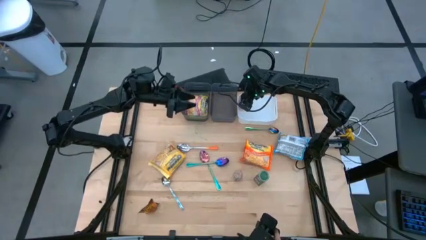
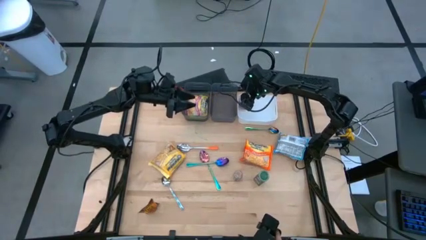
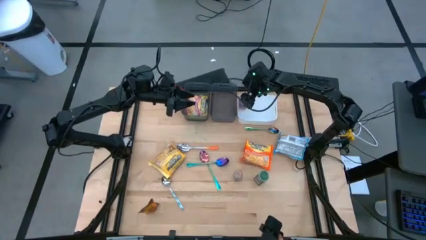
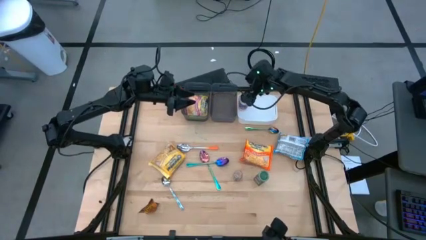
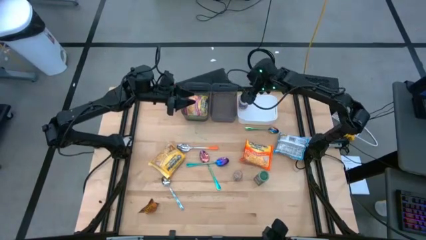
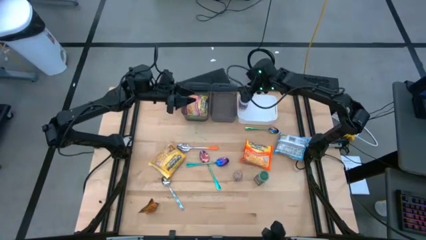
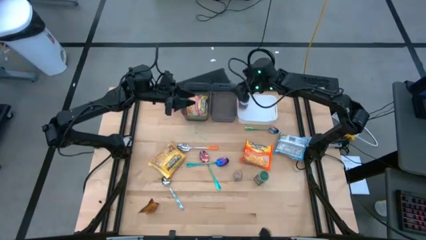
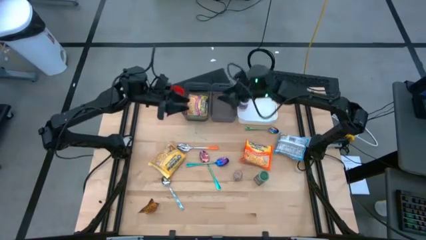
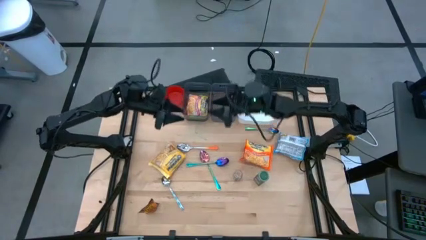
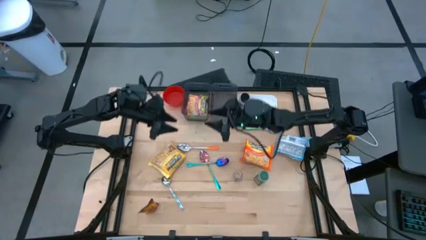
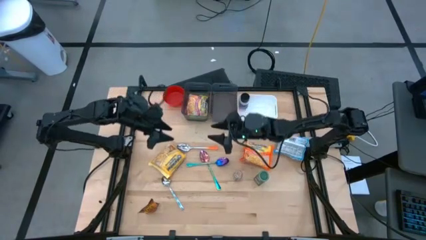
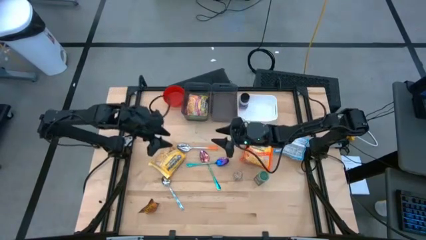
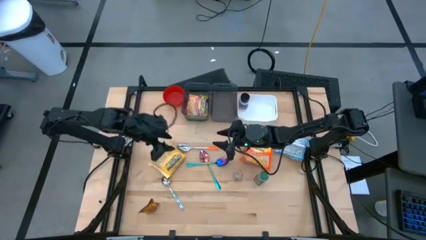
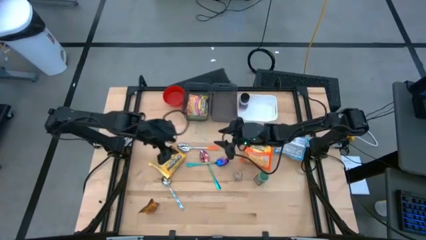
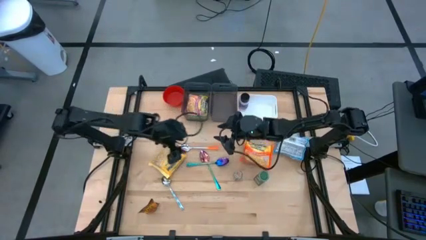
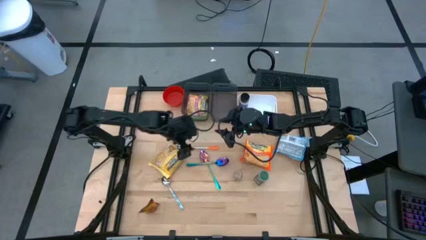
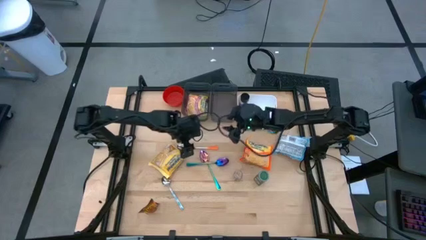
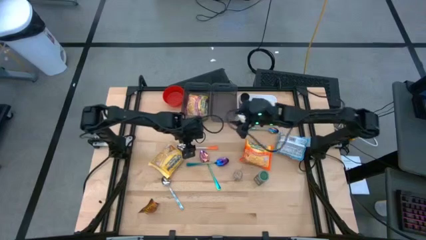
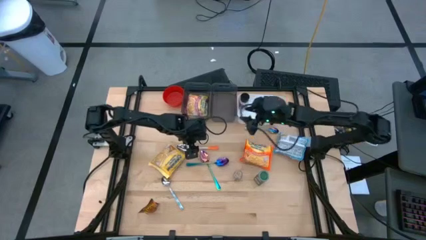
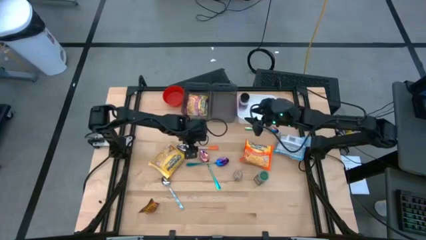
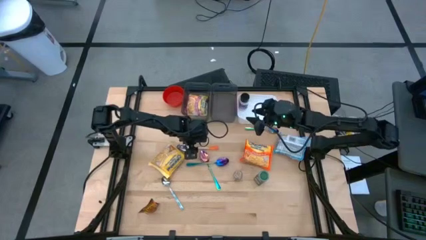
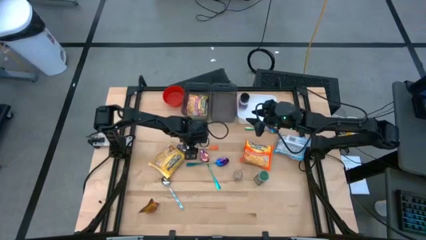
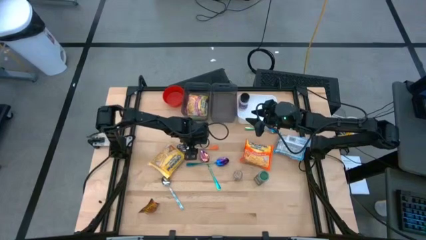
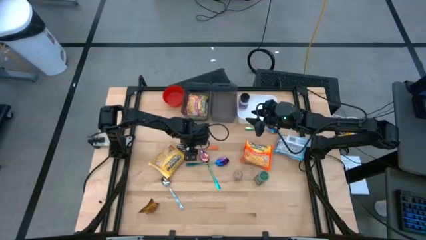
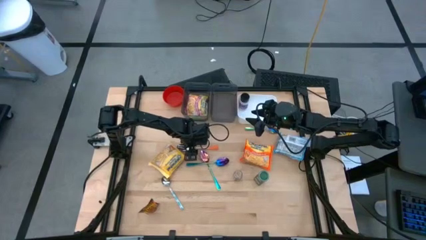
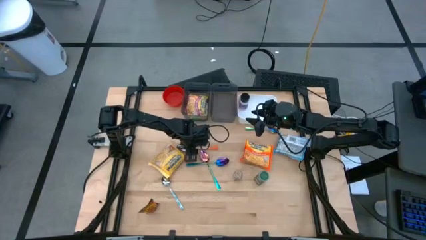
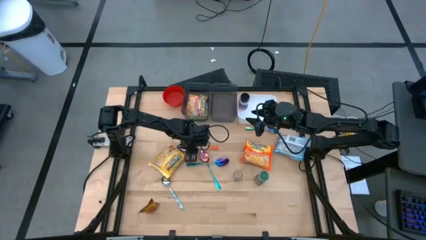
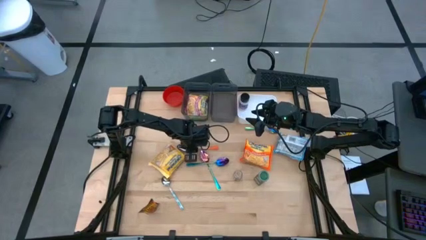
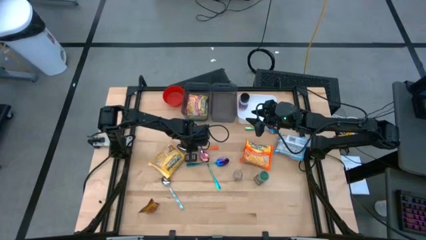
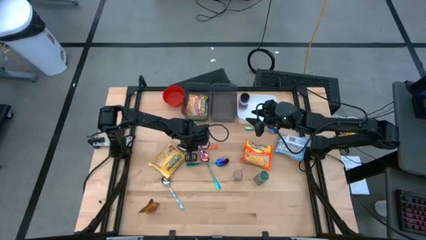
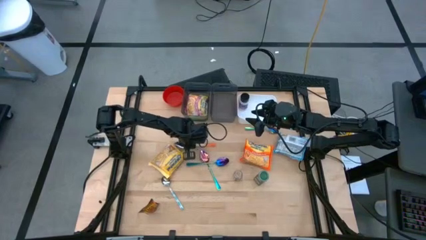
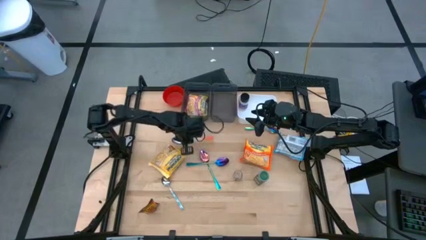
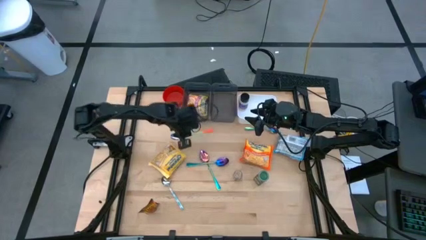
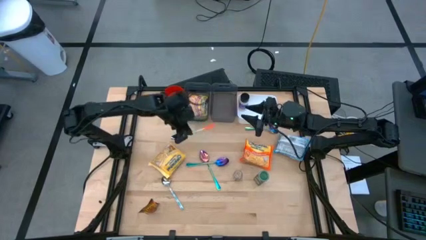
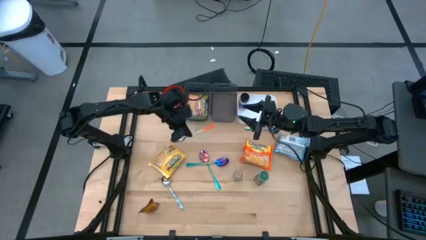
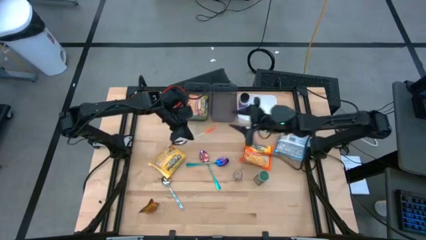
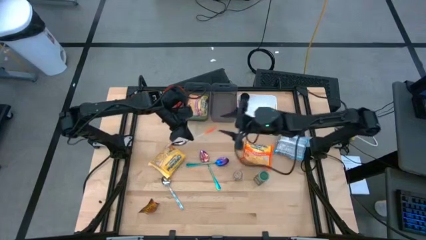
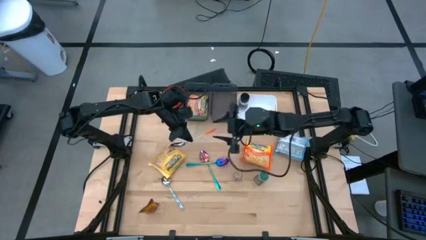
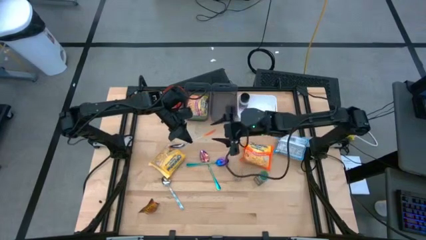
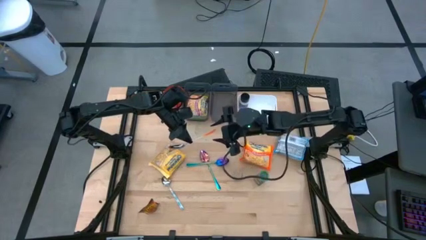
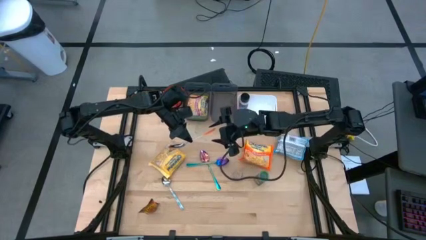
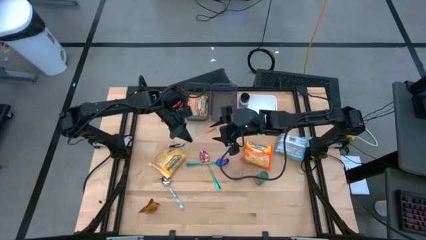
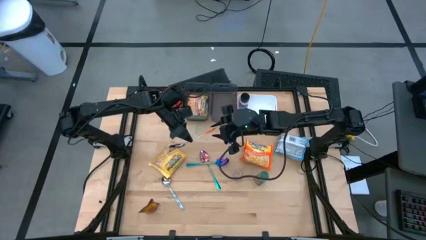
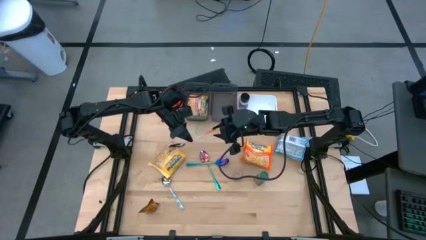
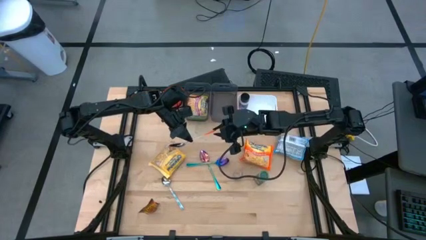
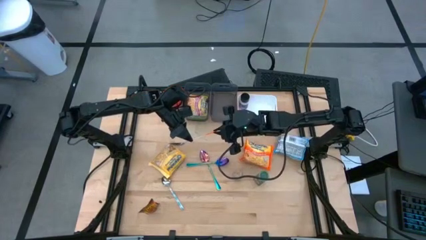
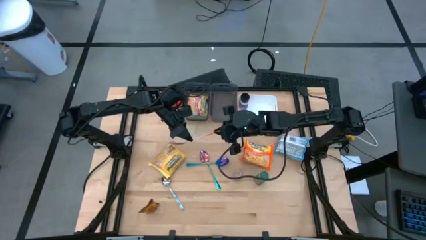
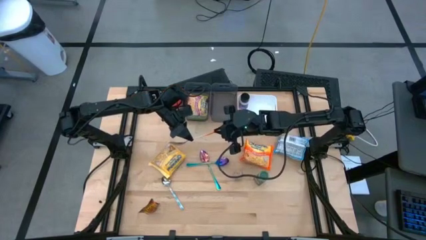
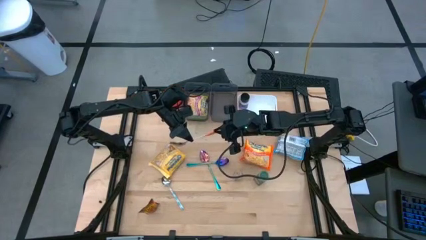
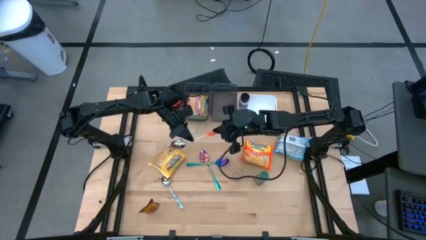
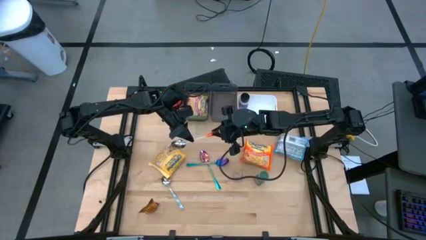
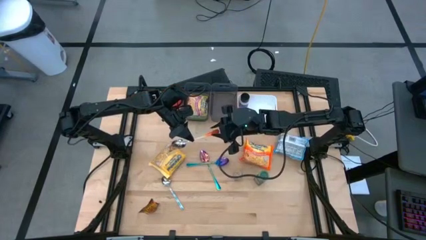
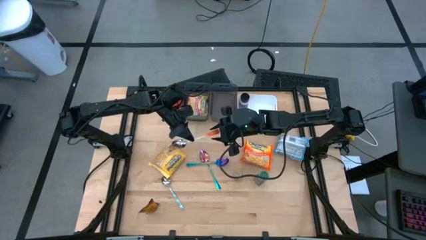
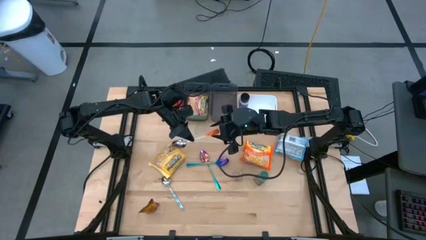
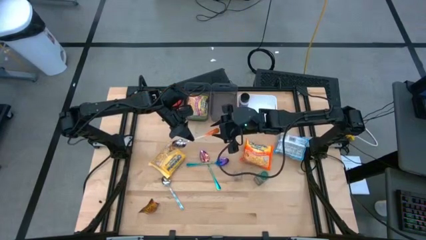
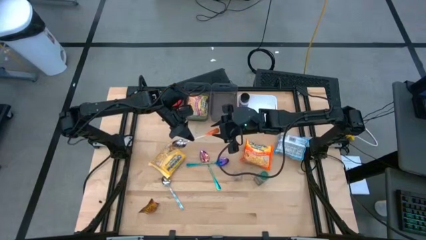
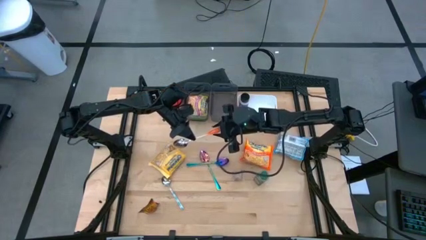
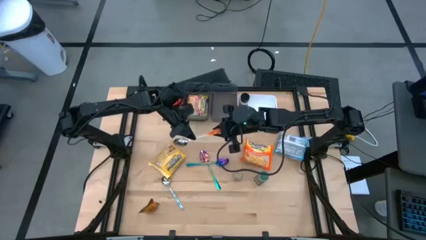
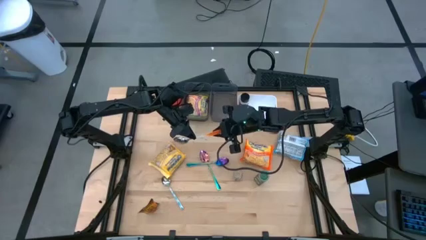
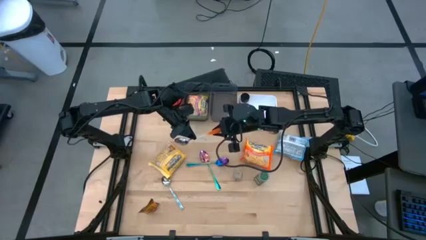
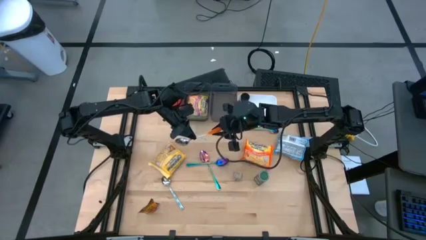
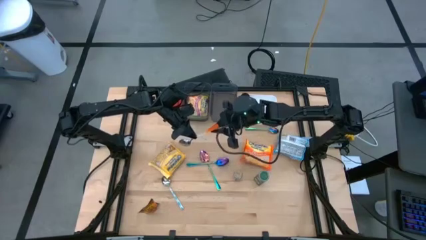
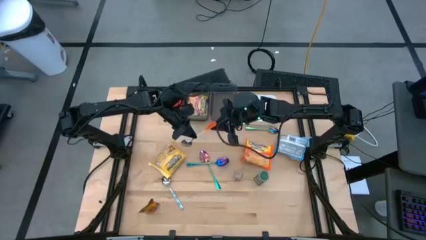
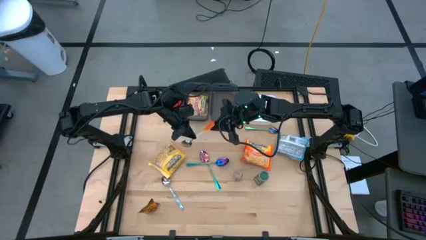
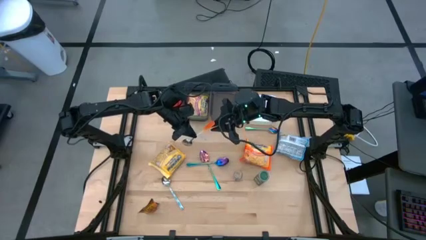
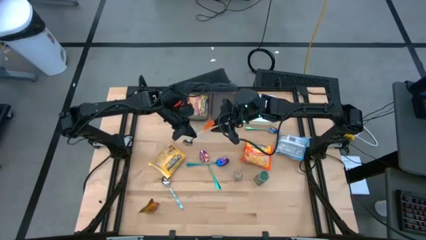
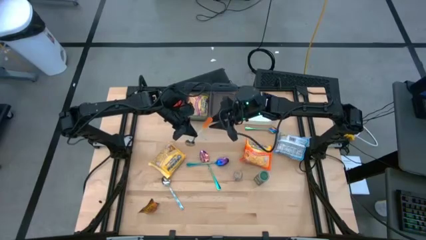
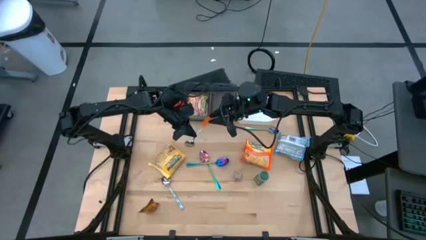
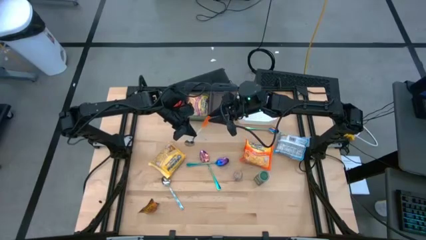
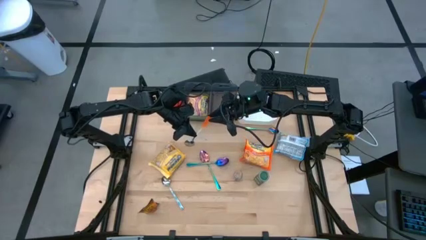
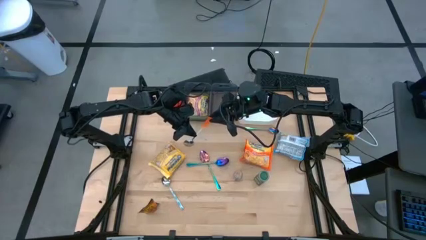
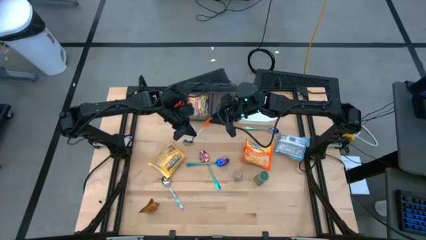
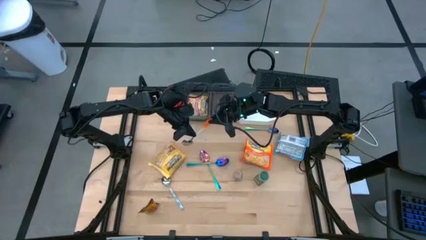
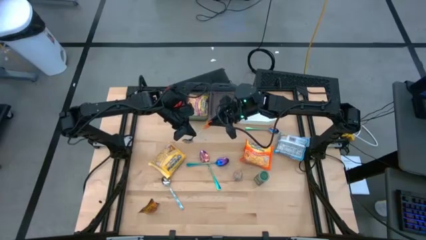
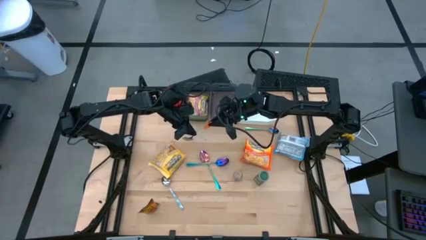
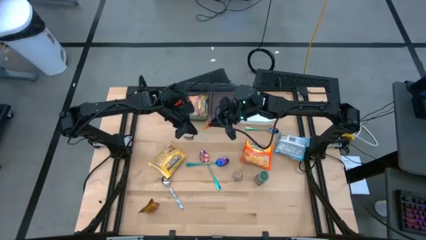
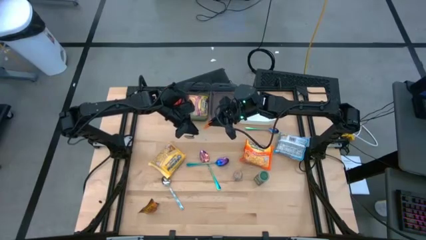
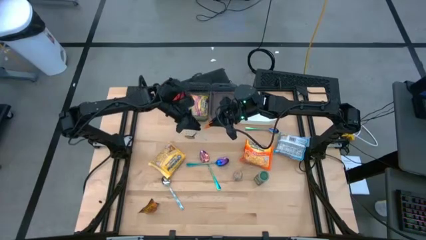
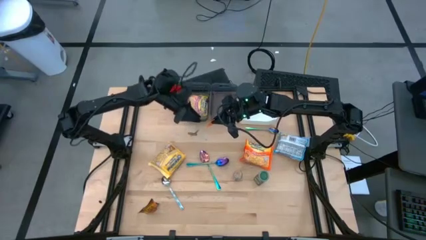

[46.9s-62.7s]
Task: Pick & Place Food Item
Put the orange spoon into the right black bin
